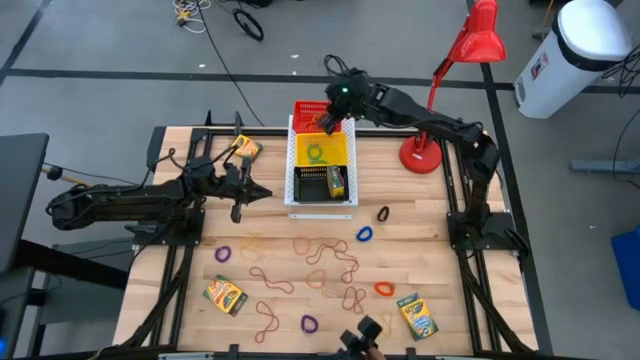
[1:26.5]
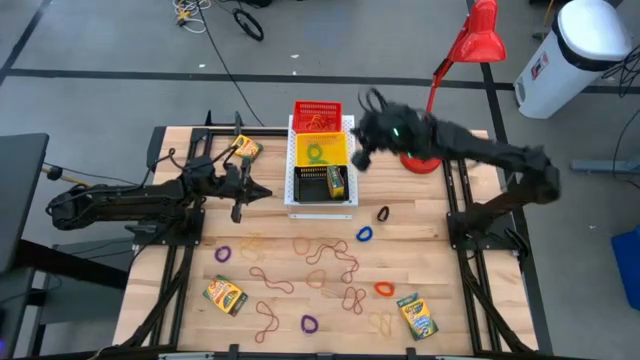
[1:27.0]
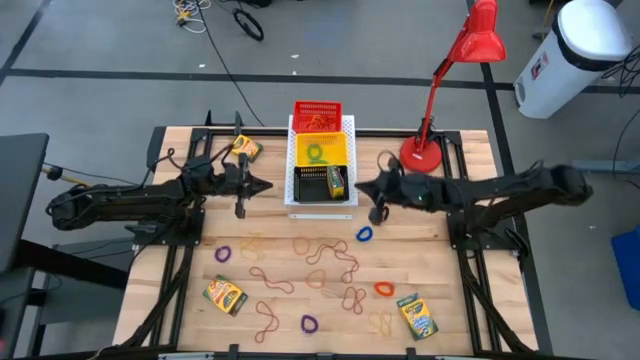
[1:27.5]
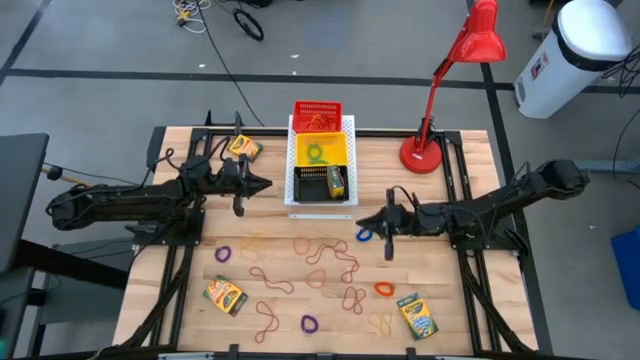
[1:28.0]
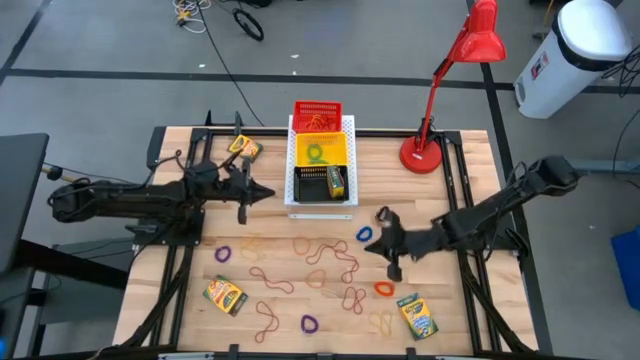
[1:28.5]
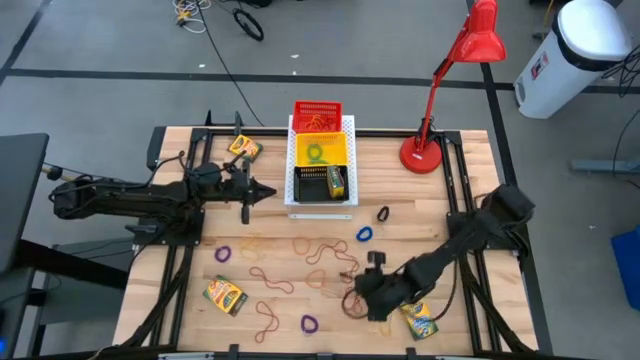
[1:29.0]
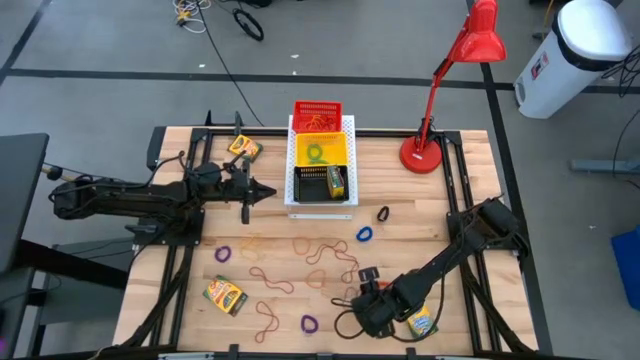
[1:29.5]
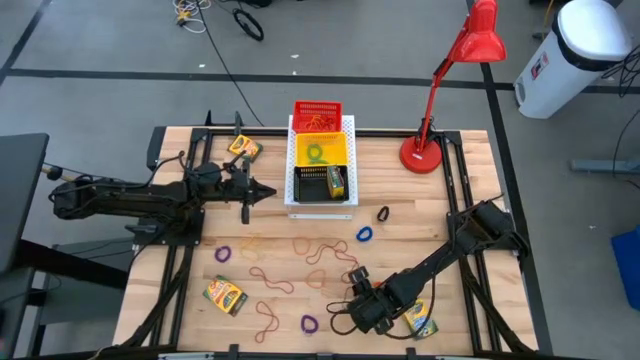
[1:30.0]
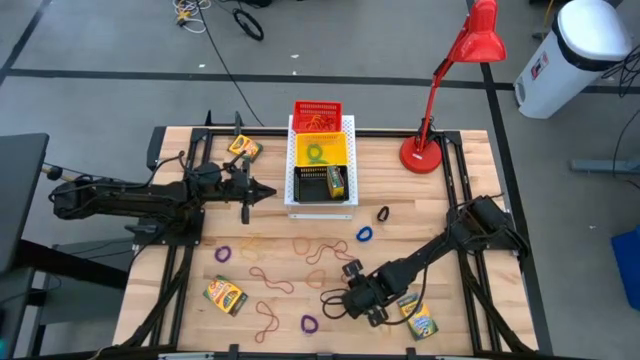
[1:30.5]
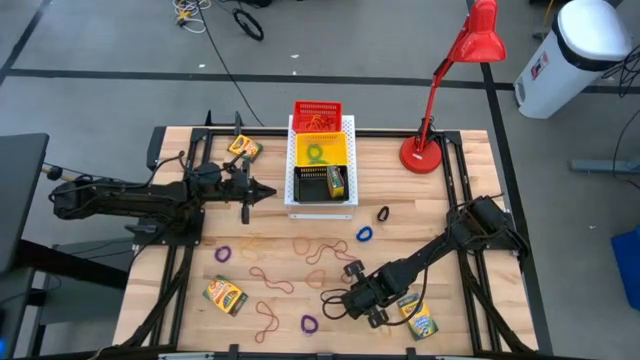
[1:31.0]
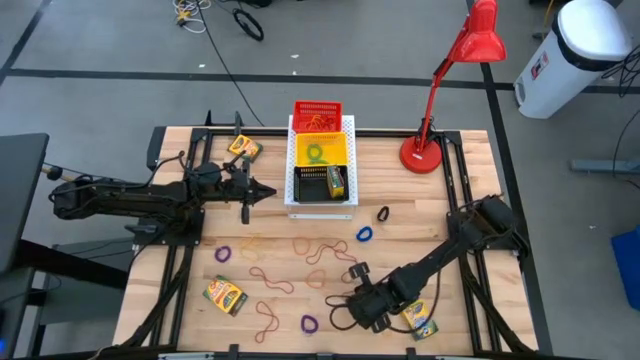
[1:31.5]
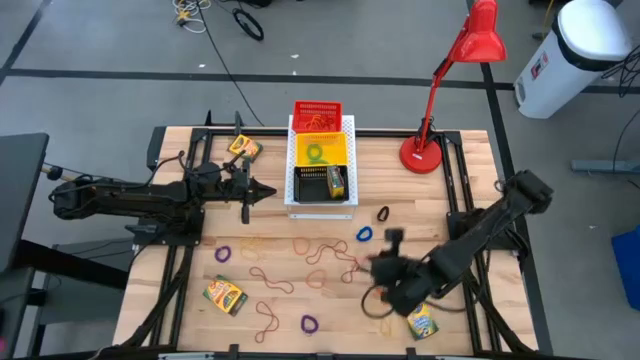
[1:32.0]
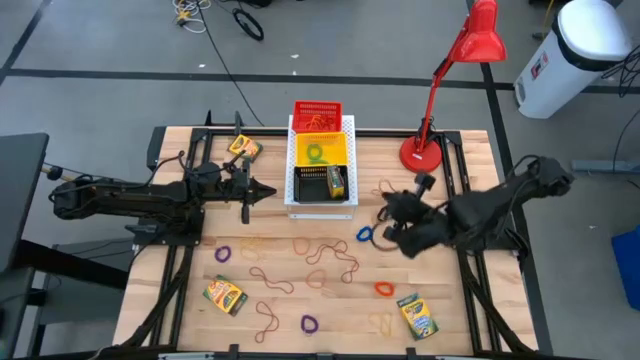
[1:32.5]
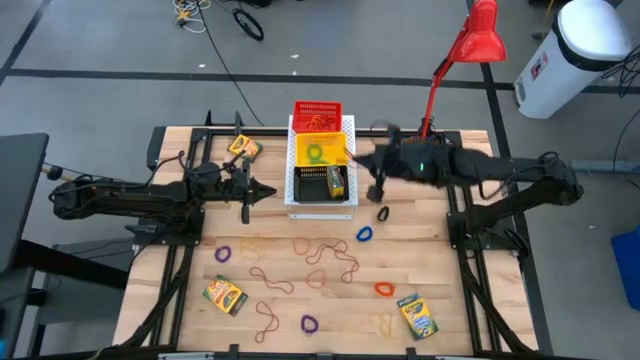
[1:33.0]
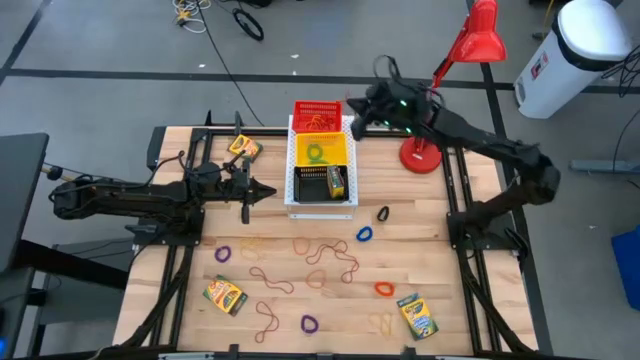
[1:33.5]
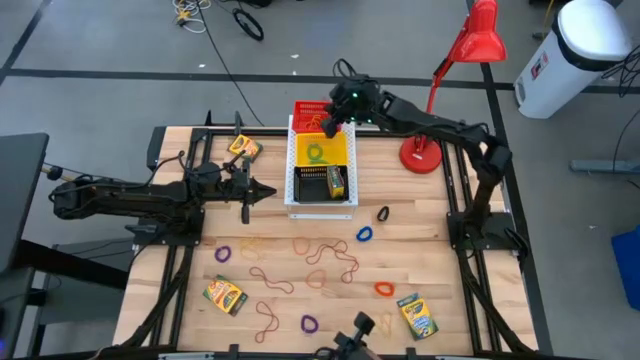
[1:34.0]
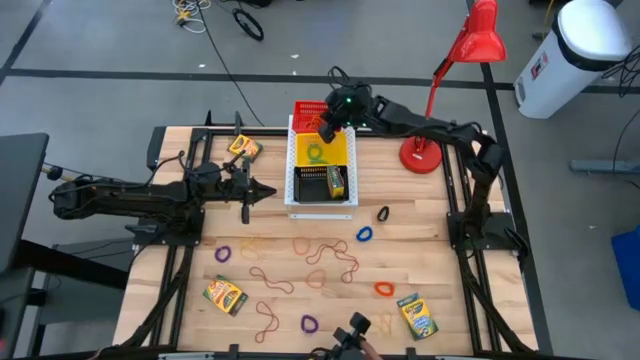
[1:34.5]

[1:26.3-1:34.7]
Task: Pick & Place Office Desk Supplies
Put the red rubber band into the red bin on the shelf

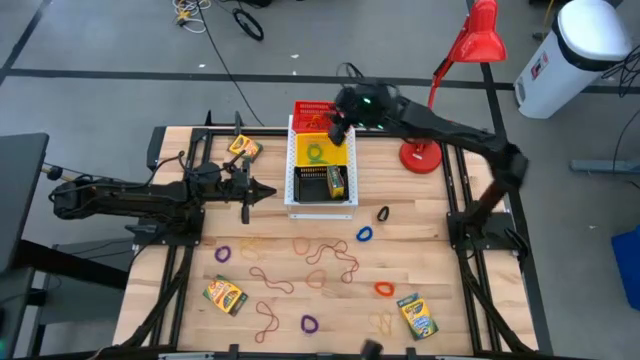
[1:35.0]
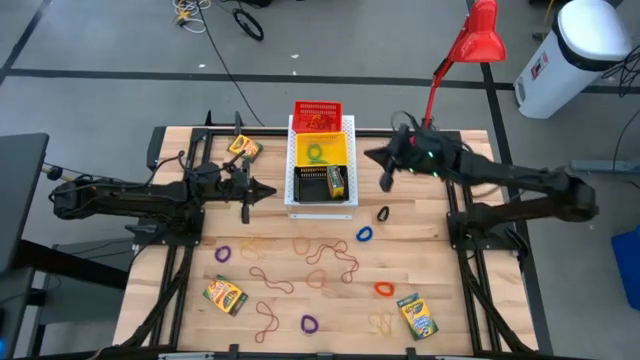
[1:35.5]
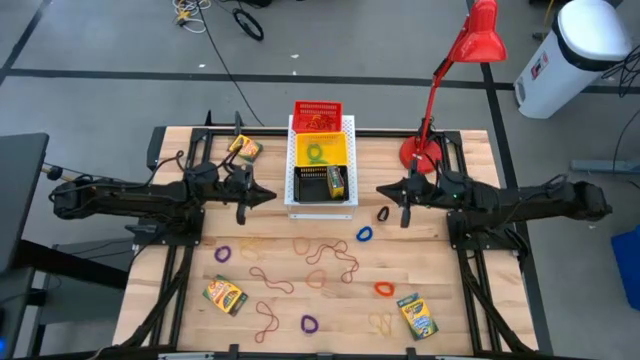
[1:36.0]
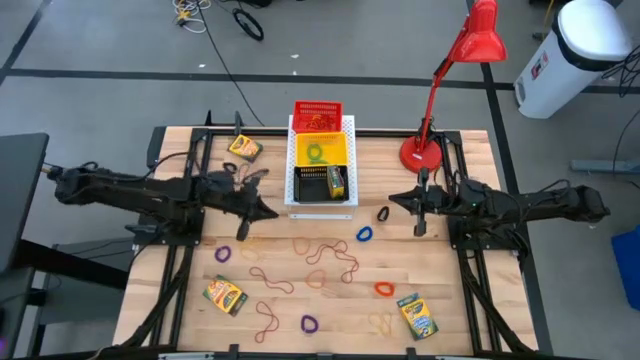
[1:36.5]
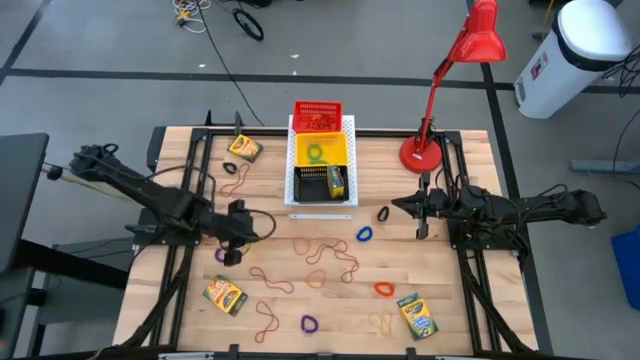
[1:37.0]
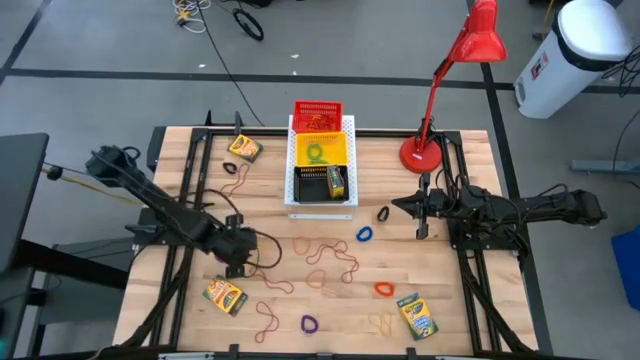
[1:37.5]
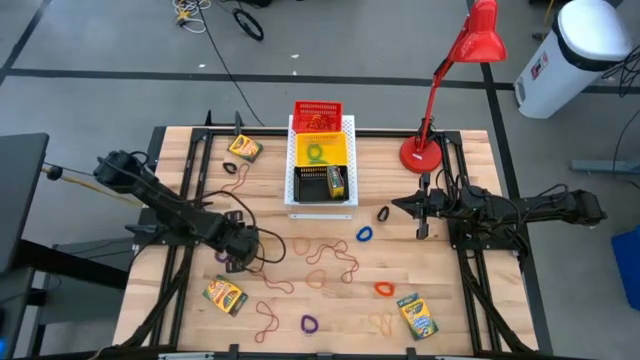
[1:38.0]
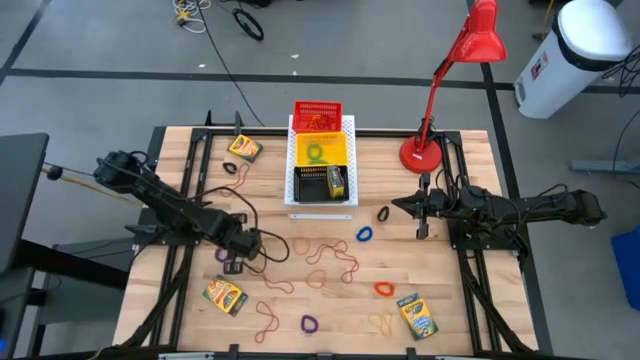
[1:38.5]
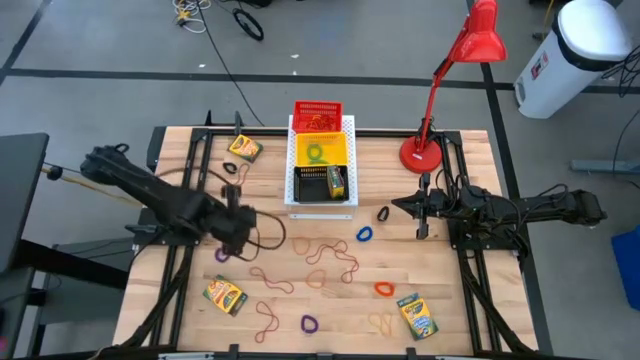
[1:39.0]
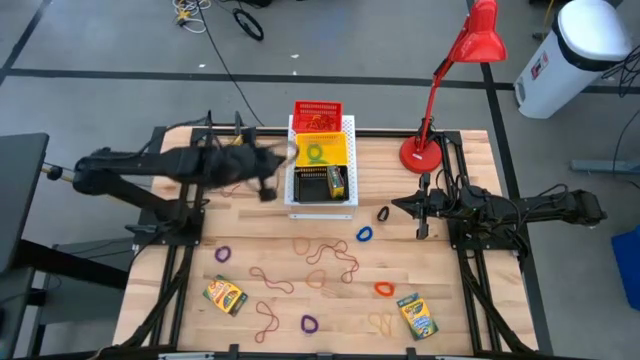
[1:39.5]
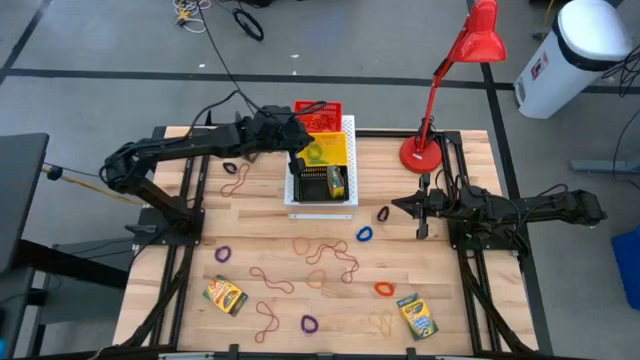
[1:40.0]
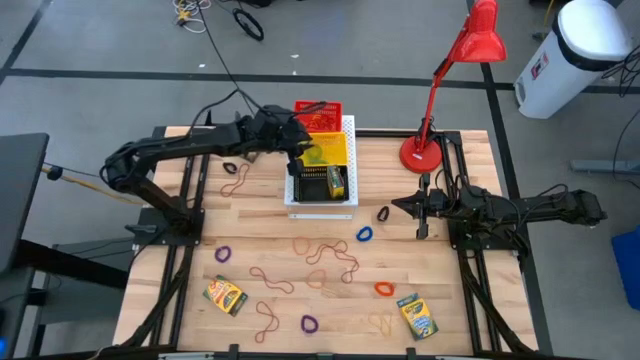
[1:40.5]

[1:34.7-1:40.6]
Put the yellow rubber band into the red bin on the shelf

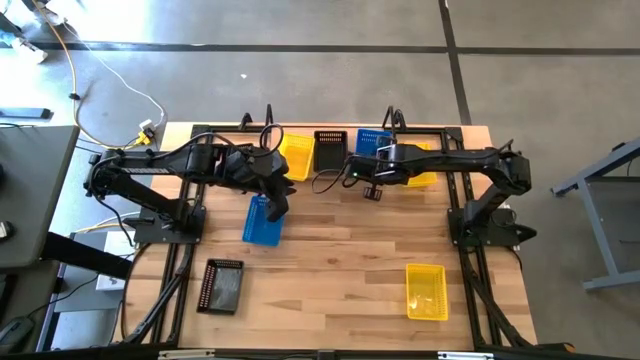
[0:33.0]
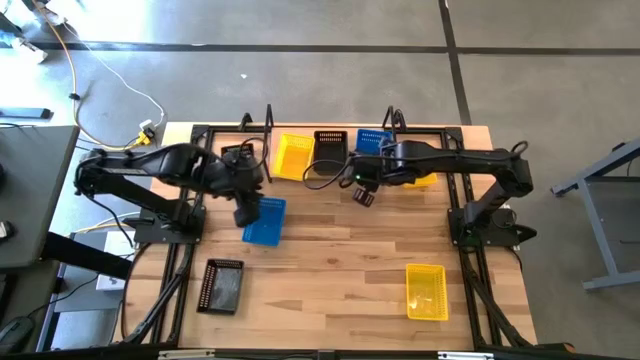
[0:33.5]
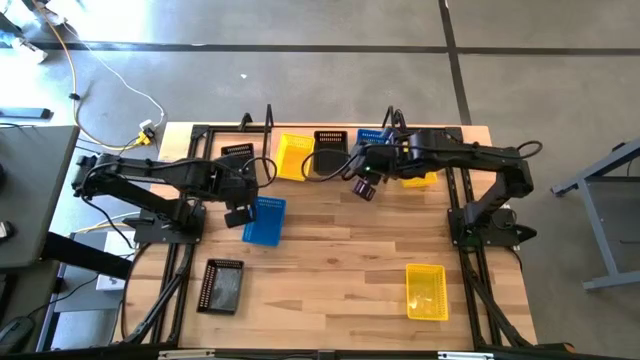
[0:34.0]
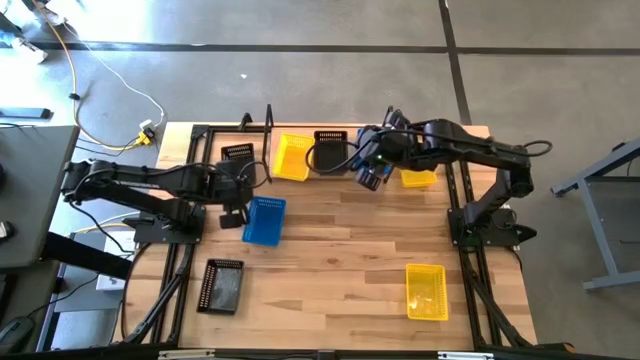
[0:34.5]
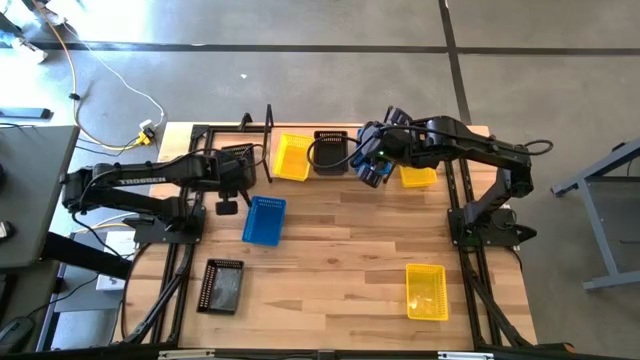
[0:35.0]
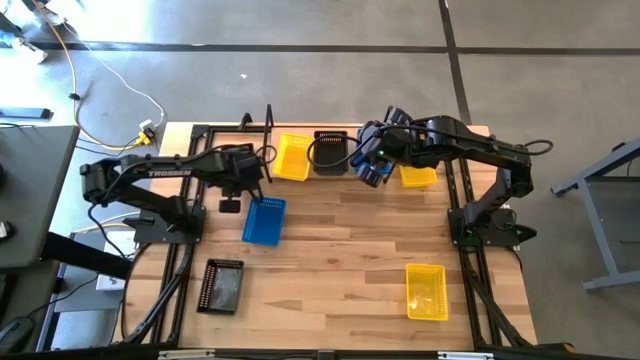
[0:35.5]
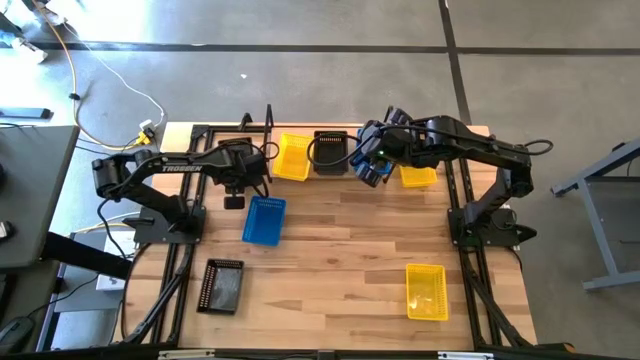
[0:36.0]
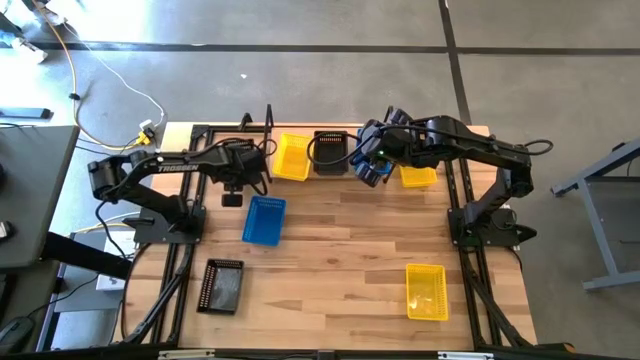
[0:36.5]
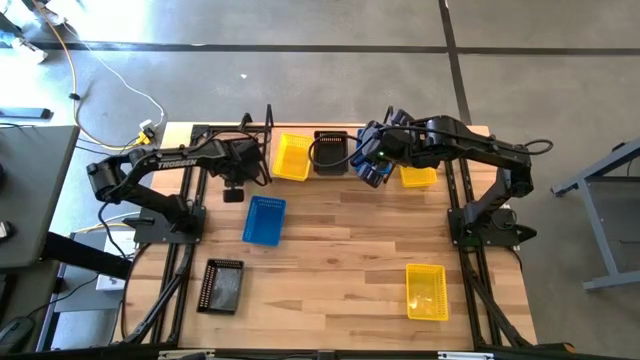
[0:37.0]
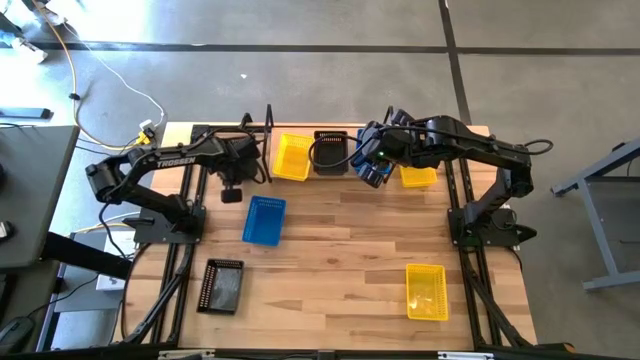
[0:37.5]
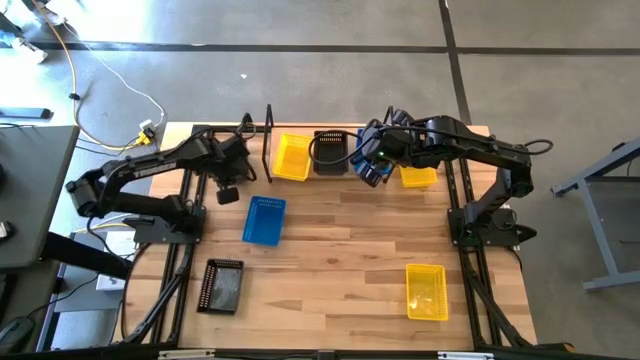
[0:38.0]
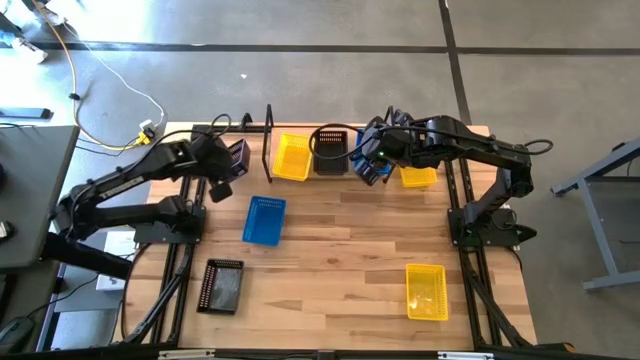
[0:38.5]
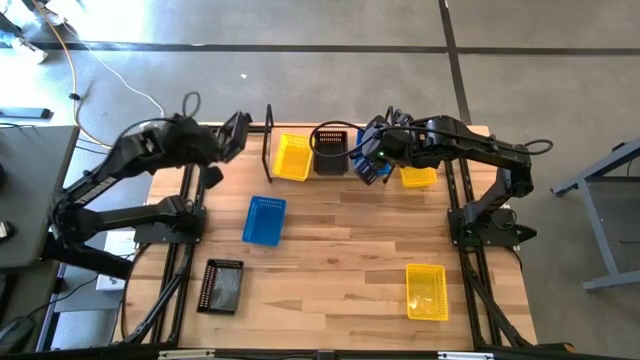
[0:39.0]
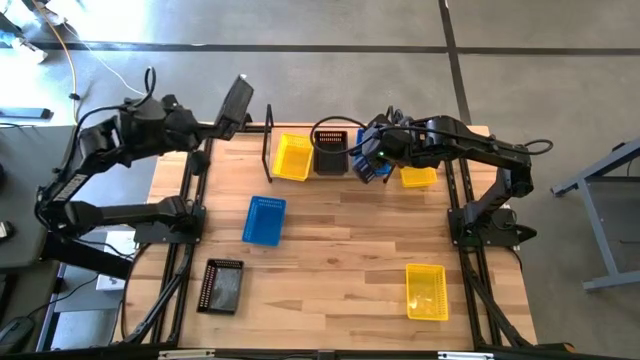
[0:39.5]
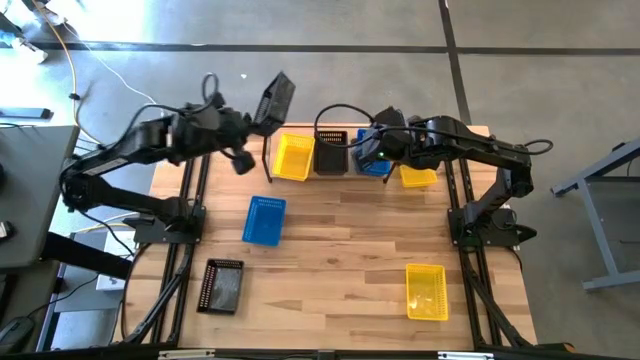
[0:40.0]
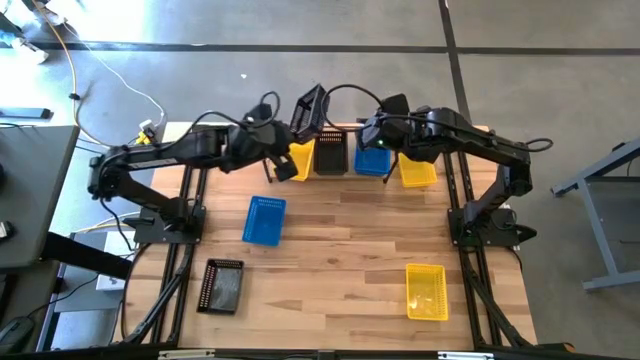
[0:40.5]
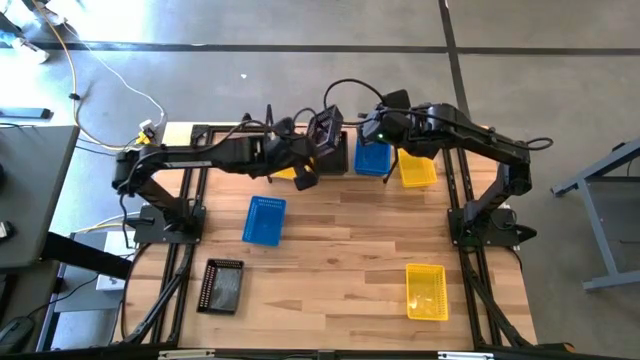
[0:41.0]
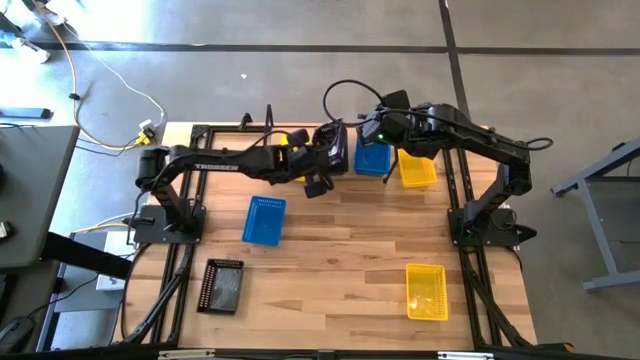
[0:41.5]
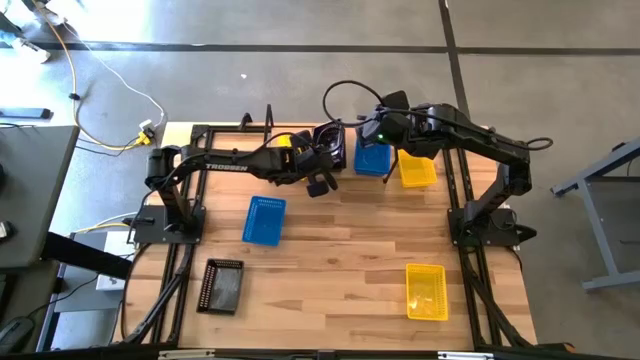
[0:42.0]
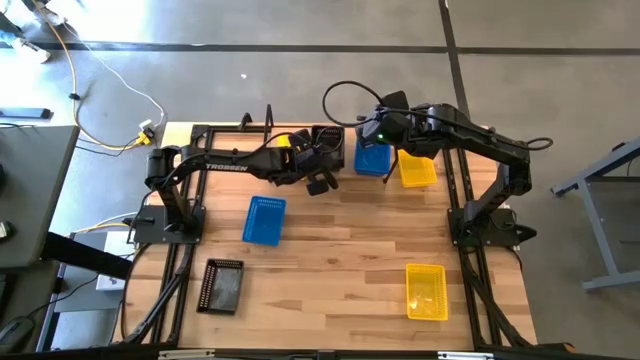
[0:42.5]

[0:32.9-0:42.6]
Task: Stack baskets on shelf by color
Stack the top black bin on top of the other black bin on the shelf
